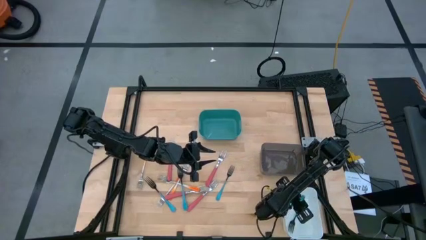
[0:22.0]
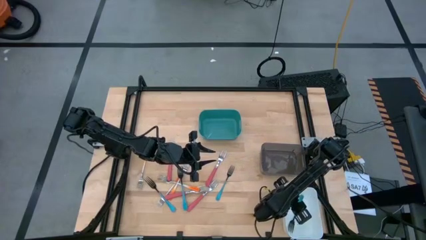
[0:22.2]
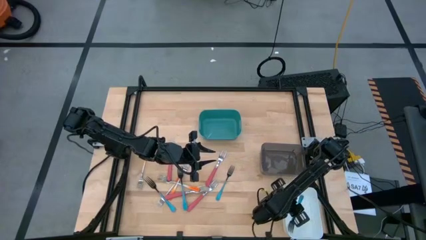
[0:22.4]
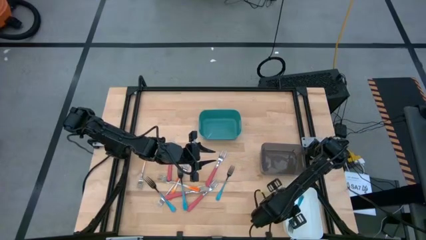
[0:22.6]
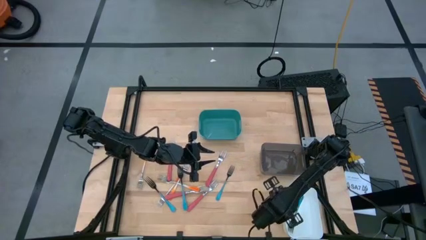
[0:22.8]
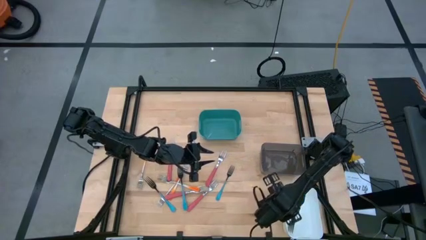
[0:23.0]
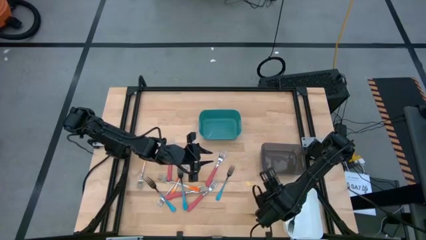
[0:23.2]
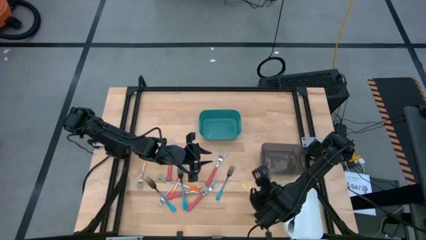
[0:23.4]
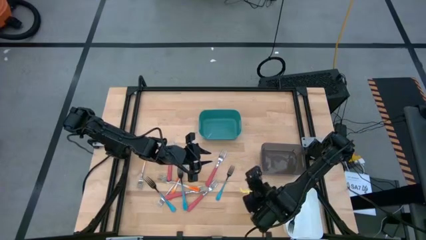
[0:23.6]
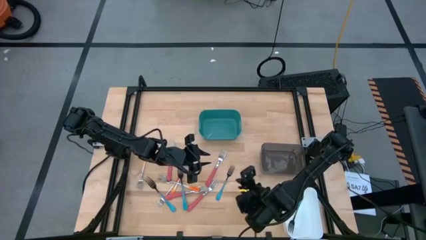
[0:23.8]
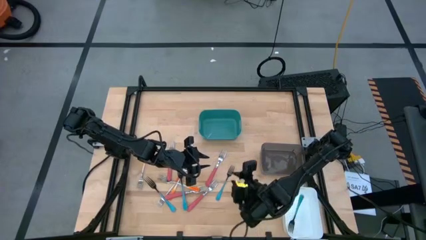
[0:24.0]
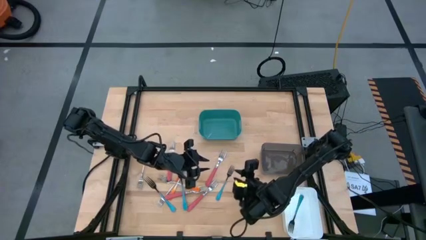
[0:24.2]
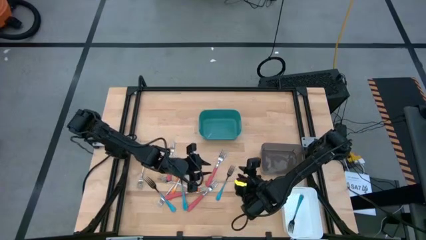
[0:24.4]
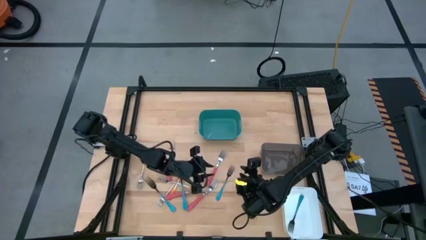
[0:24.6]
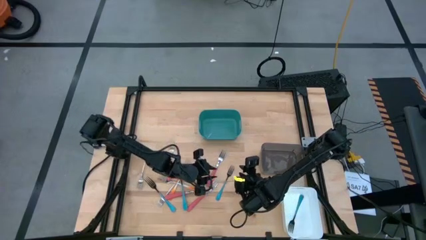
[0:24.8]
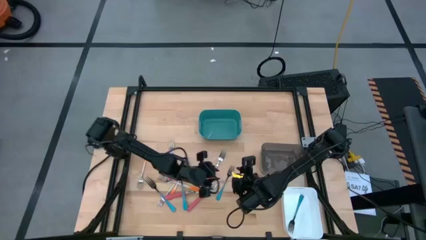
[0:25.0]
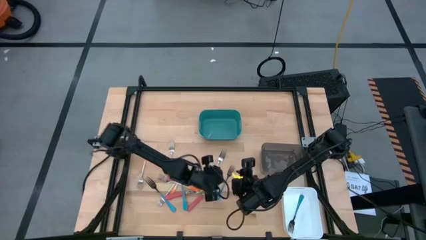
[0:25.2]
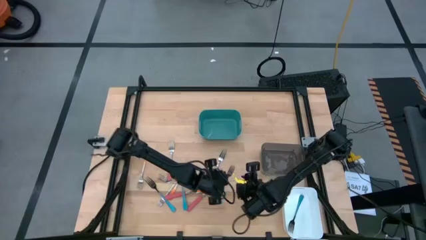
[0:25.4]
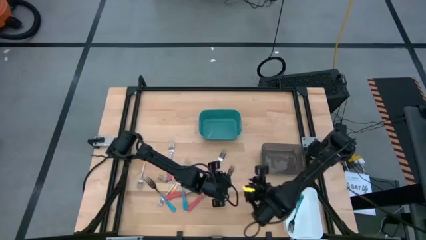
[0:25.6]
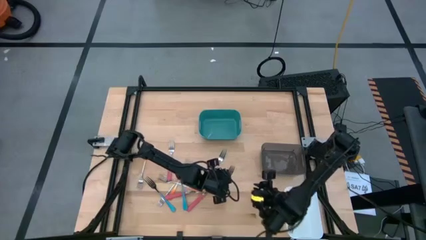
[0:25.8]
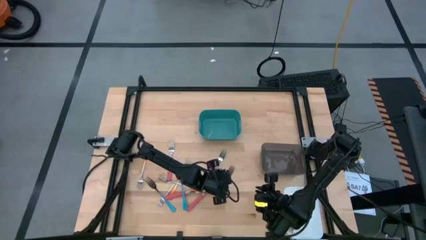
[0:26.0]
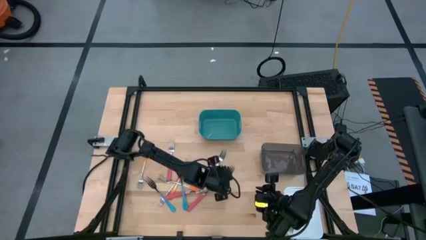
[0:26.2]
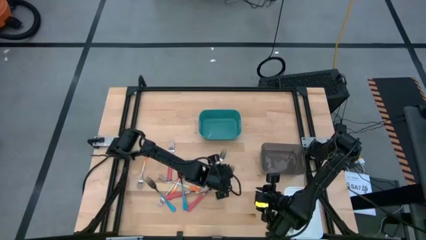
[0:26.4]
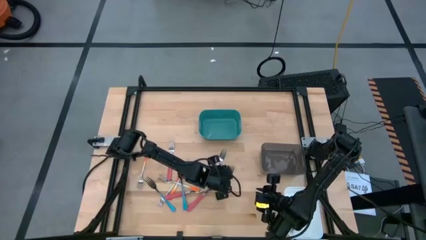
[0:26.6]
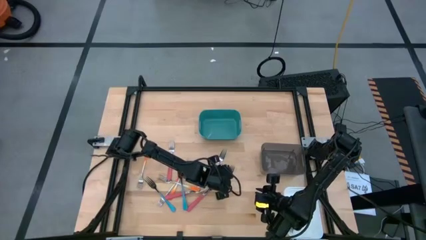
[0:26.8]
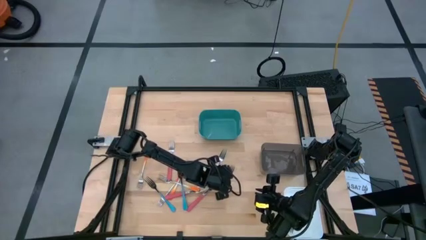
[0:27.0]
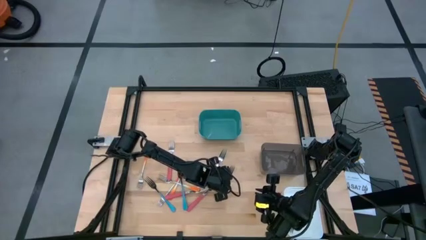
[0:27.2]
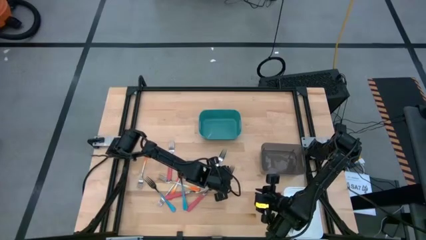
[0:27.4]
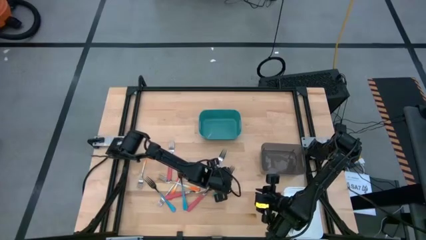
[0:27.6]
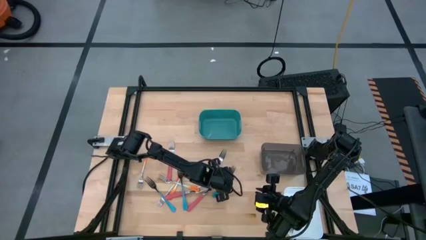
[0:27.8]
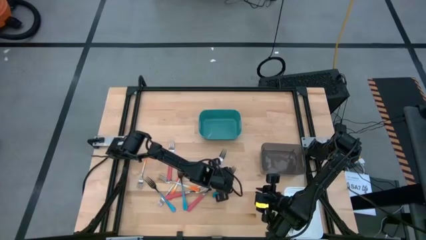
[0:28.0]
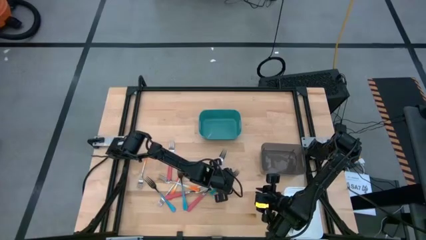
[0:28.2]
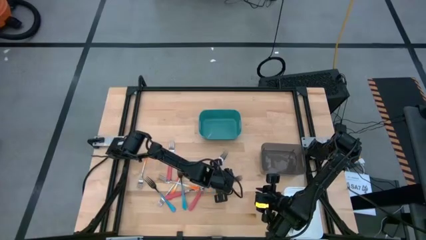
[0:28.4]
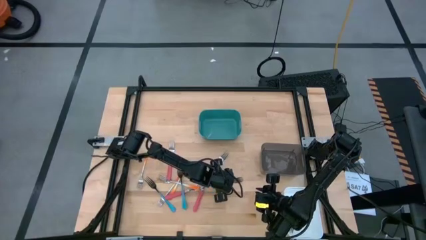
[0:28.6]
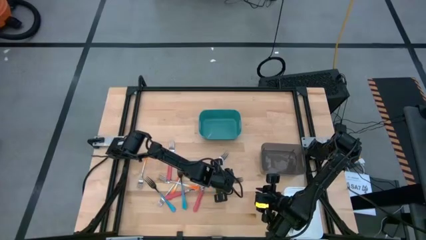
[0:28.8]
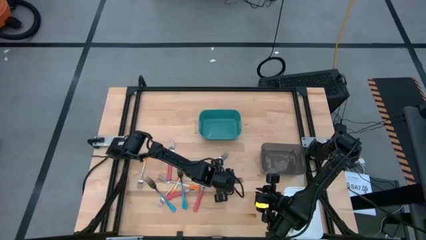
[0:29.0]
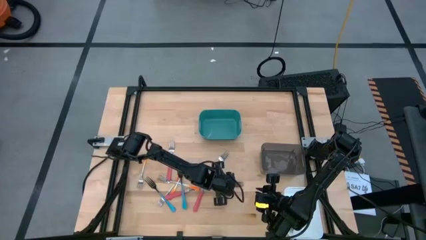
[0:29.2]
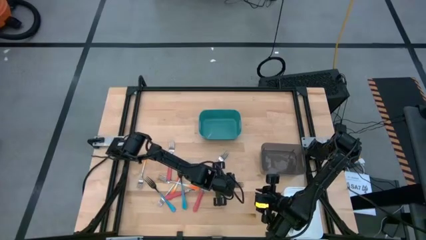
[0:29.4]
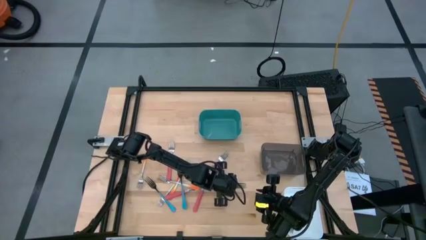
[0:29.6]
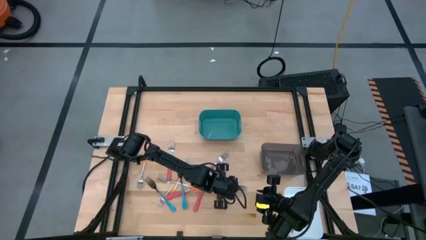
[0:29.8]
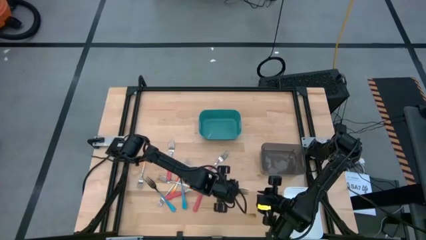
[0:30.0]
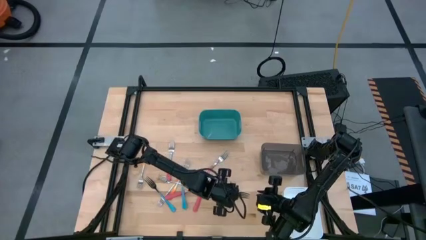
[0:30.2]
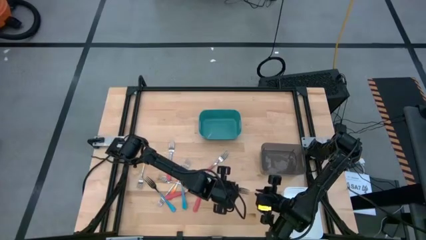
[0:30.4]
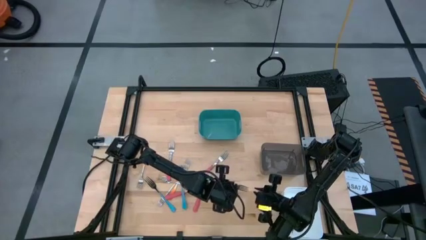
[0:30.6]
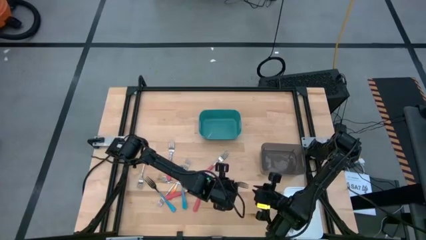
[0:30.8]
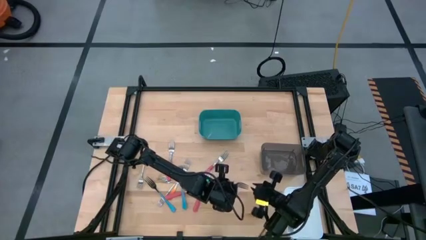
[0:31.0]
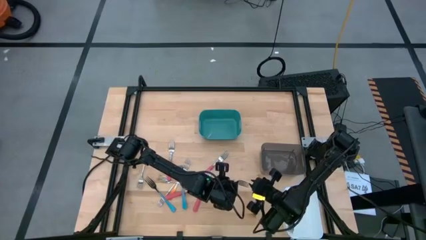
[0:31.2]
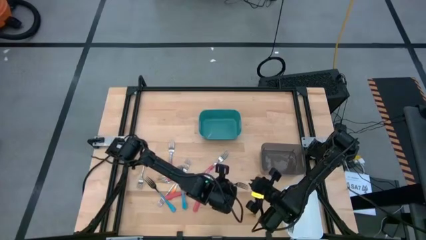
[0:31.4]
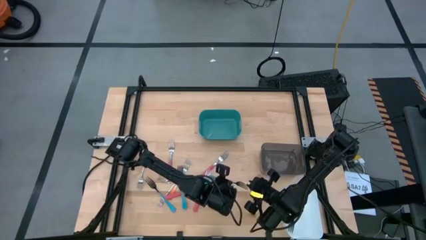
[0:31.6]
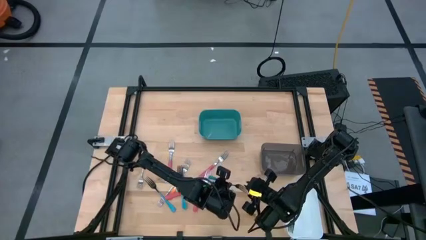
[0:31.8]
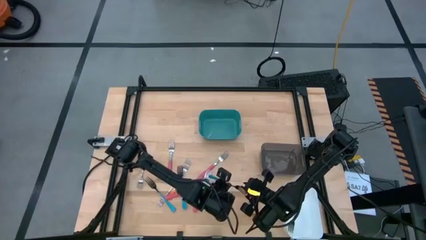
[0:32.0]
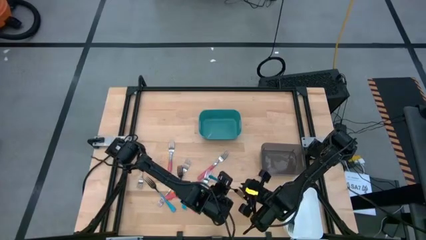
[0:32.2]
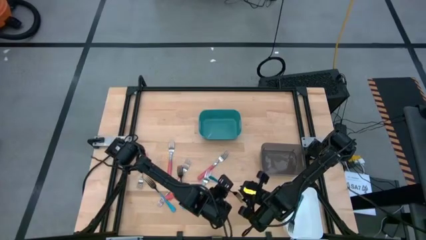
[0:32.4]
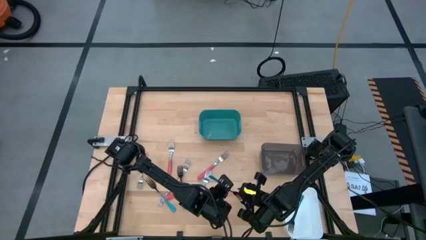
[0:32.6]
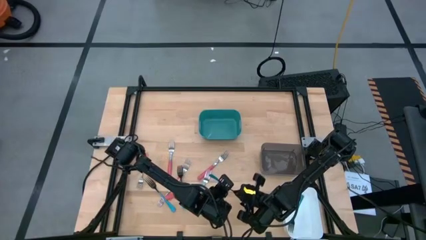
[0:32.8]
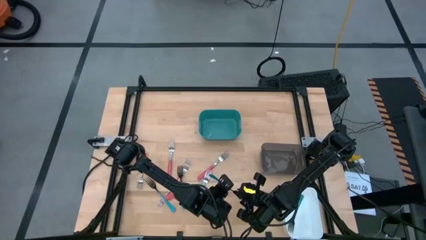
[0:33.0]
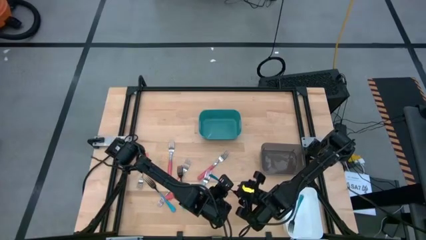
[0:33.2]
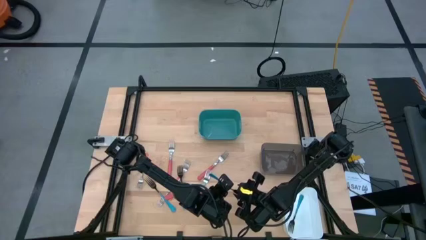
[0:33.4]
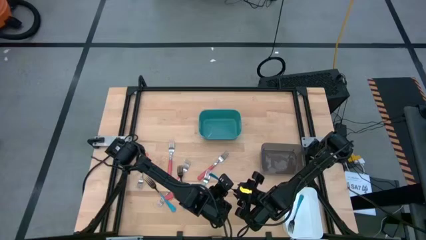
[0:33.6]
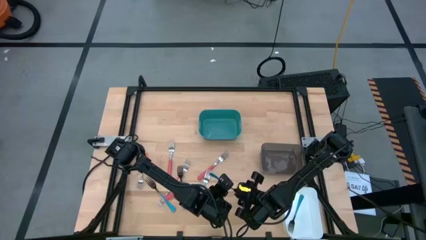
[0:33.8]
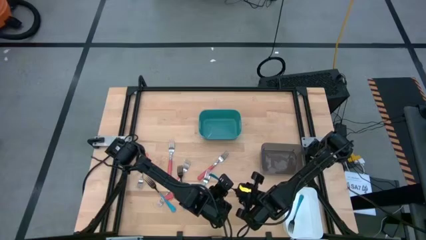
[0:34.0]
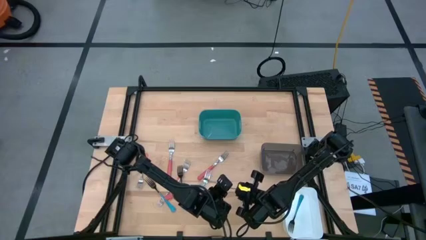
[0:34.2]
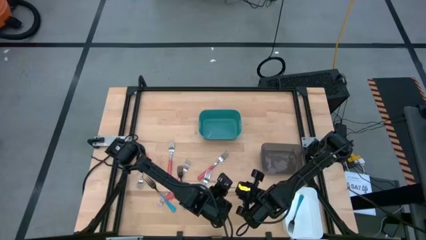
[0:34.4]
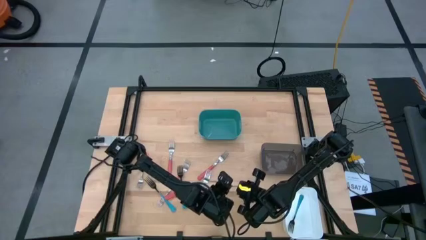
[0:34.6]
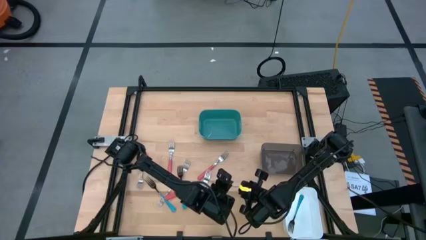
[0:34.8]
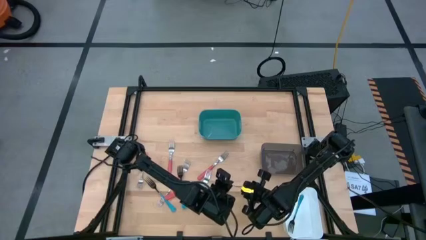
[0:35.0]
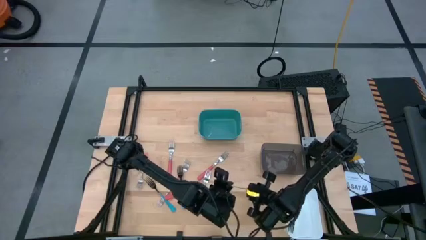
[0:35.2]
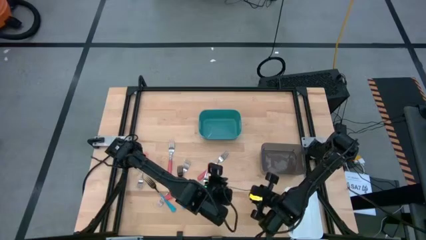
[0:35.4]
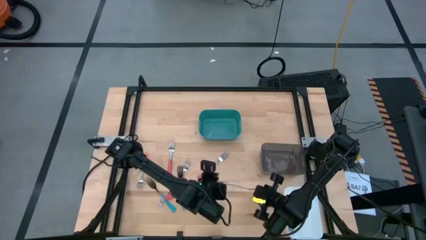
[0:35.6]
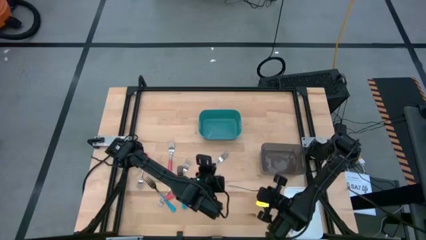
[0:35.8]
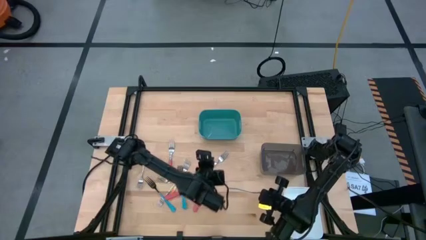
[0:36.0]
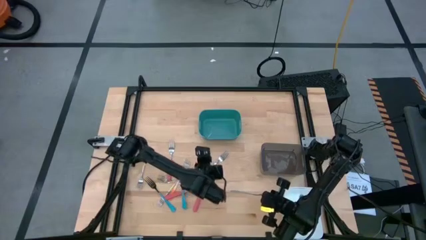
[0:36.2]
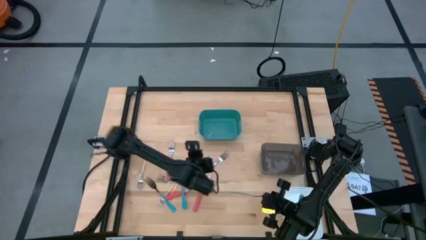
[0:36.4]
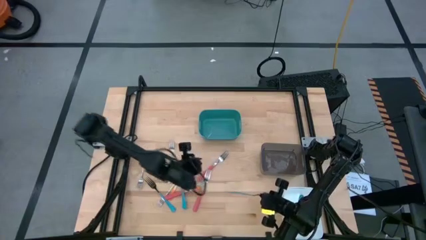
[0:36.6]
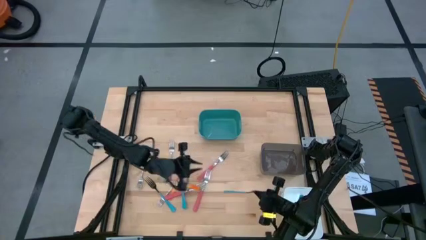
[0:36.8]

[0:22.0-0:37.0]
Task: Sort silverware by color (type)
Put the blue fork into the white bin
